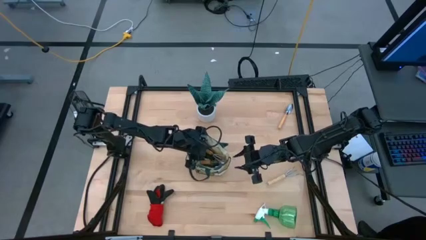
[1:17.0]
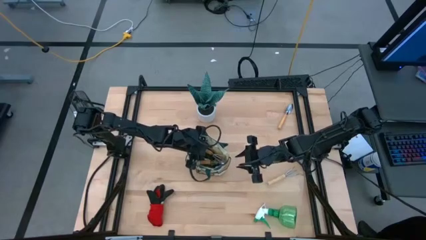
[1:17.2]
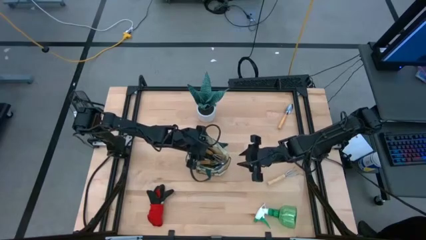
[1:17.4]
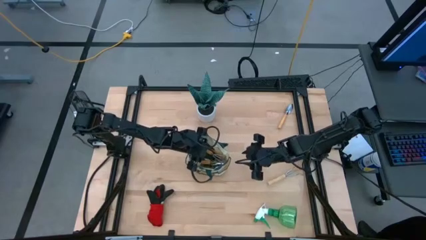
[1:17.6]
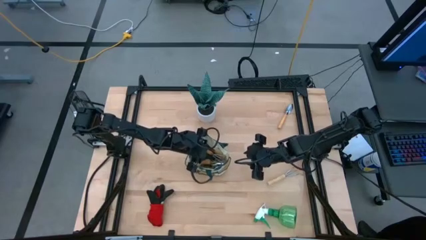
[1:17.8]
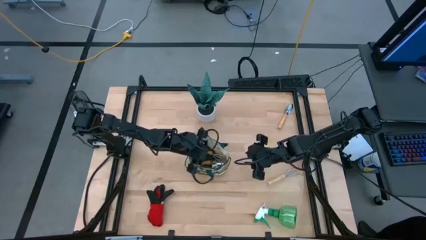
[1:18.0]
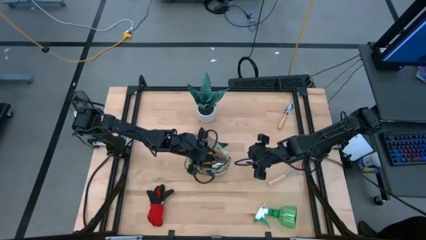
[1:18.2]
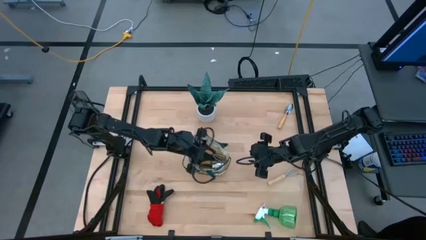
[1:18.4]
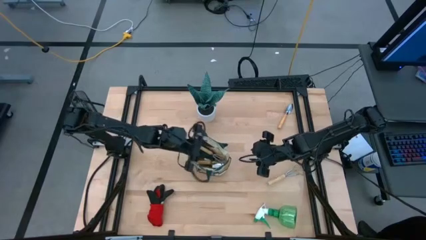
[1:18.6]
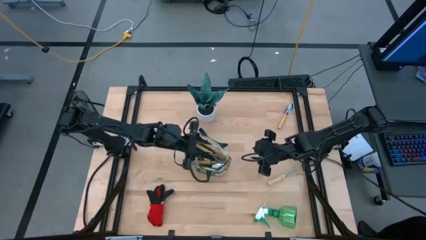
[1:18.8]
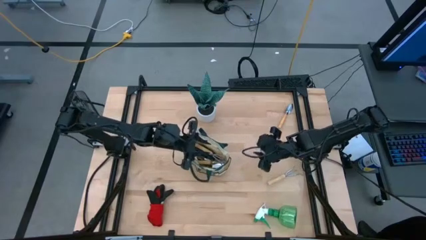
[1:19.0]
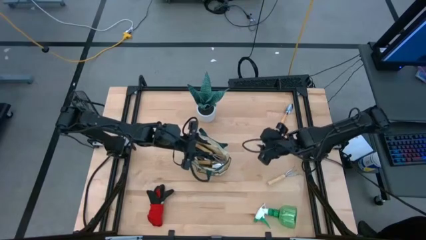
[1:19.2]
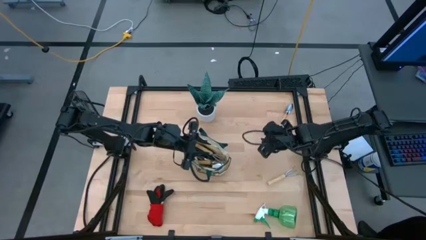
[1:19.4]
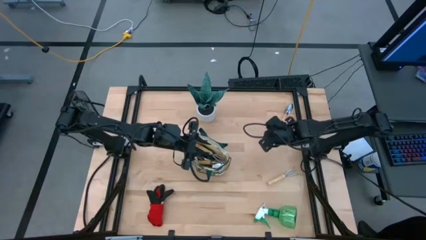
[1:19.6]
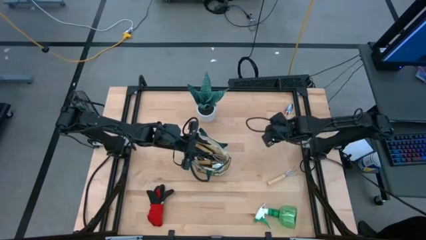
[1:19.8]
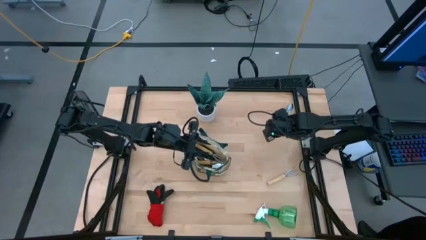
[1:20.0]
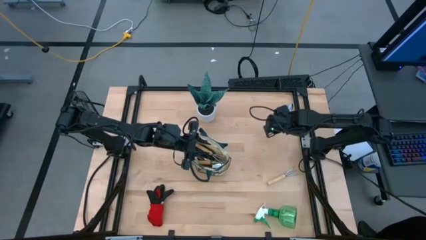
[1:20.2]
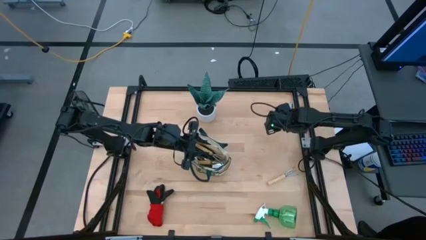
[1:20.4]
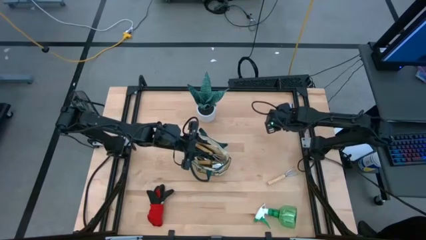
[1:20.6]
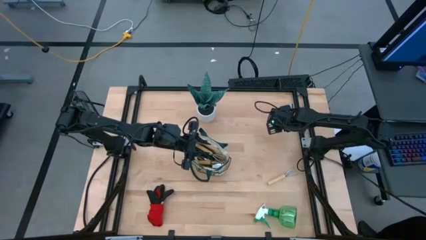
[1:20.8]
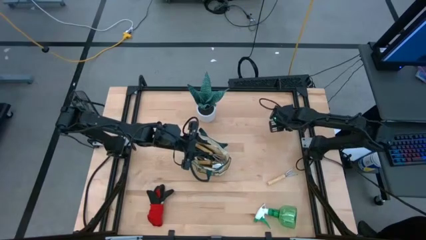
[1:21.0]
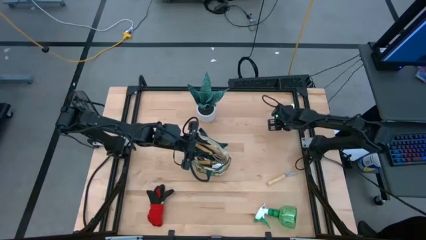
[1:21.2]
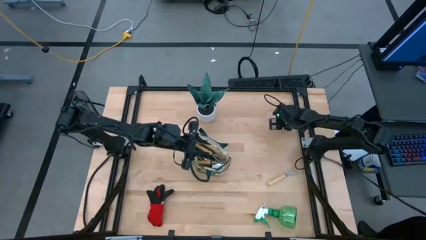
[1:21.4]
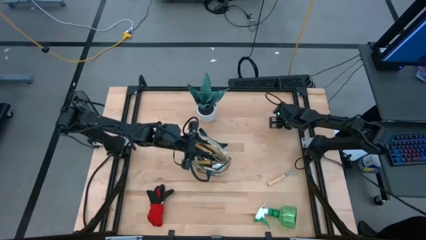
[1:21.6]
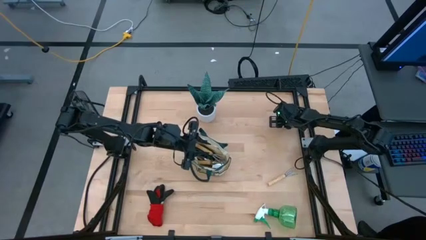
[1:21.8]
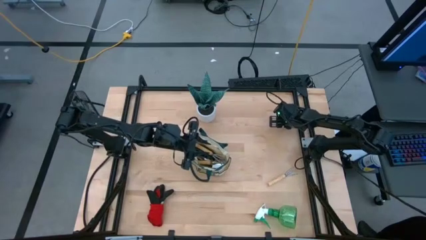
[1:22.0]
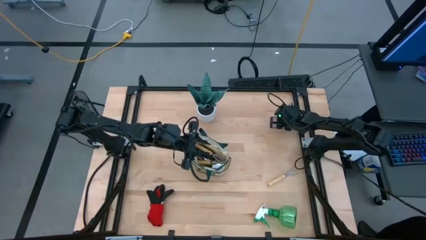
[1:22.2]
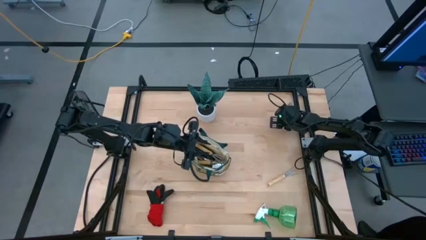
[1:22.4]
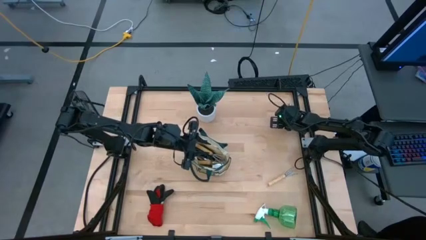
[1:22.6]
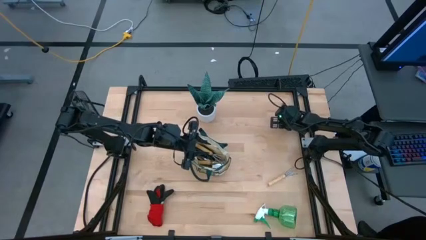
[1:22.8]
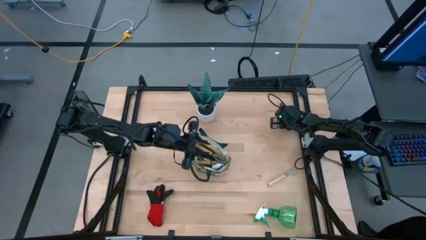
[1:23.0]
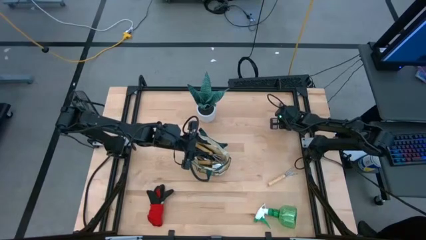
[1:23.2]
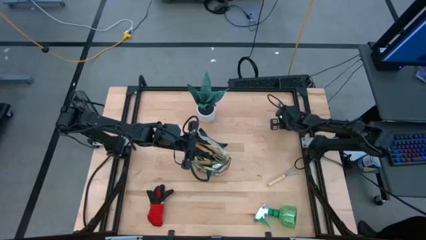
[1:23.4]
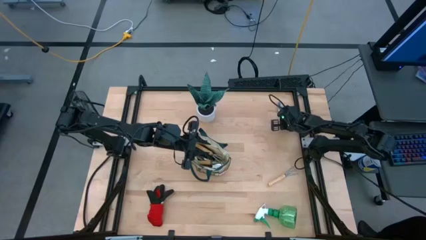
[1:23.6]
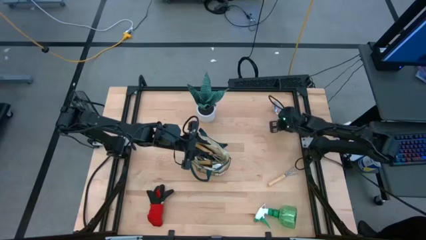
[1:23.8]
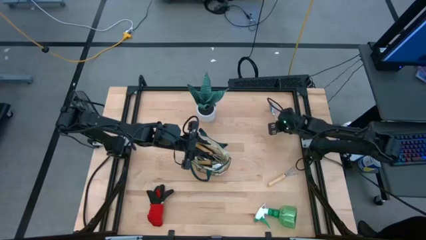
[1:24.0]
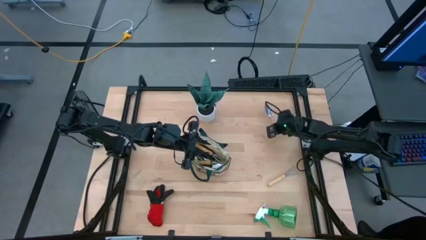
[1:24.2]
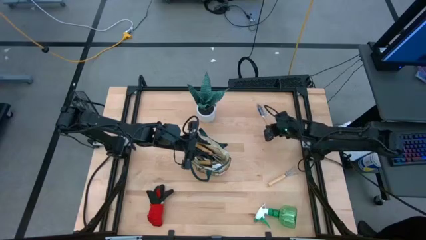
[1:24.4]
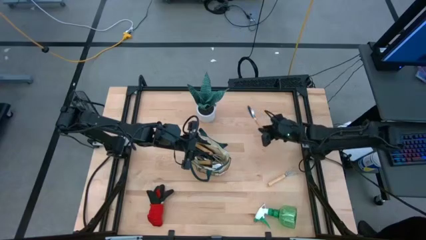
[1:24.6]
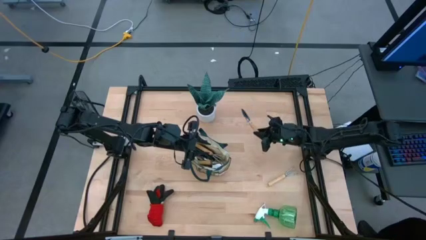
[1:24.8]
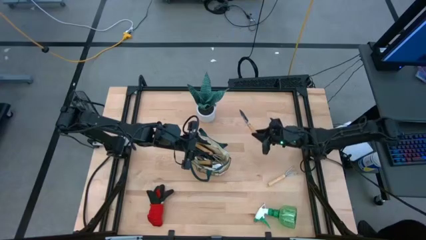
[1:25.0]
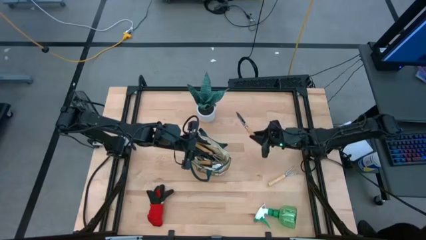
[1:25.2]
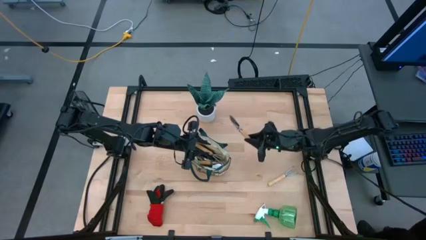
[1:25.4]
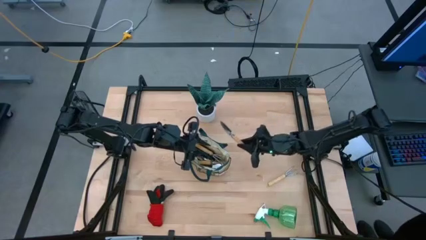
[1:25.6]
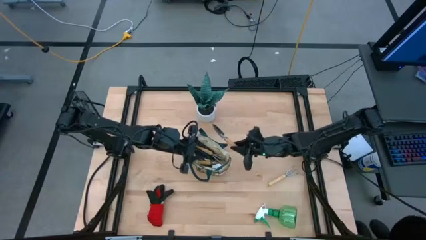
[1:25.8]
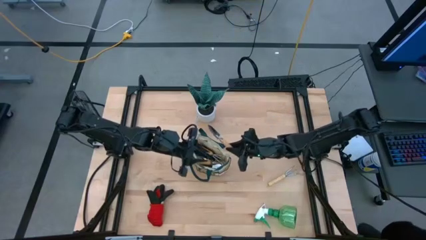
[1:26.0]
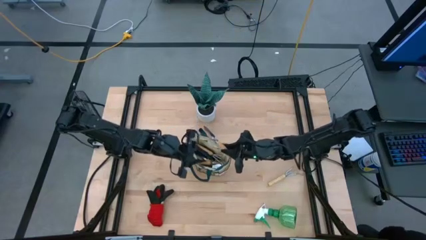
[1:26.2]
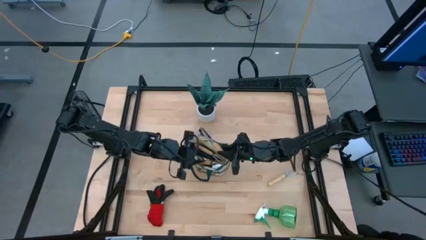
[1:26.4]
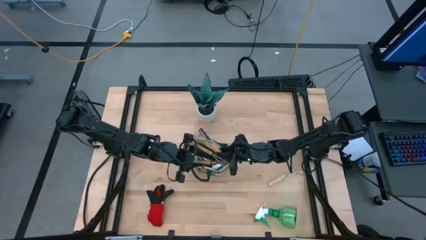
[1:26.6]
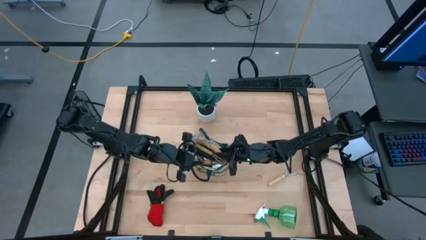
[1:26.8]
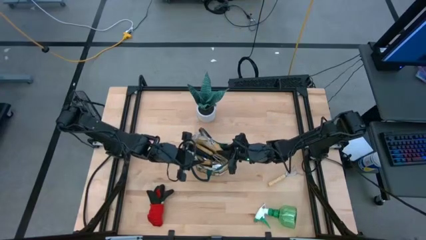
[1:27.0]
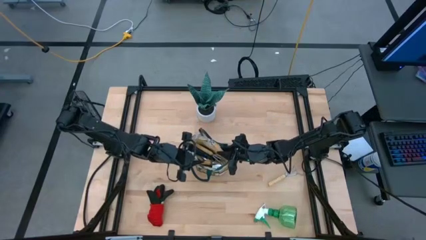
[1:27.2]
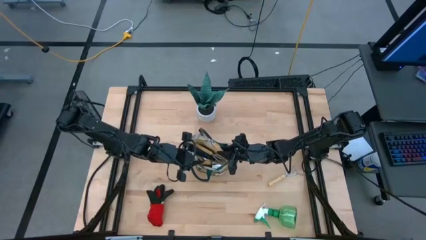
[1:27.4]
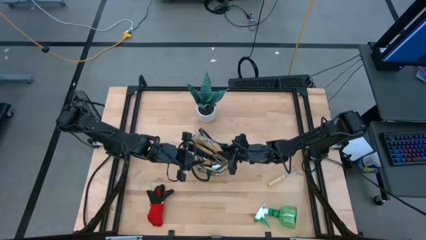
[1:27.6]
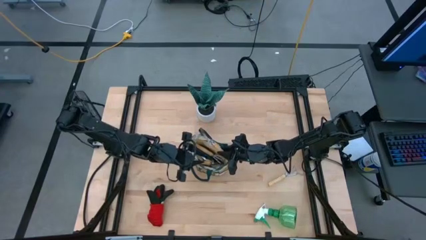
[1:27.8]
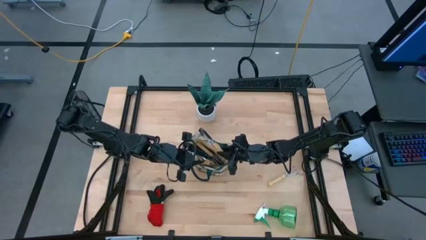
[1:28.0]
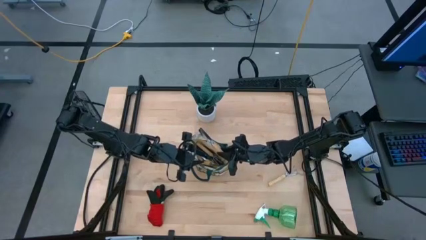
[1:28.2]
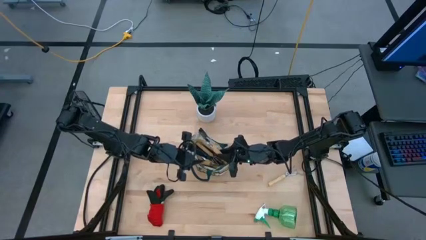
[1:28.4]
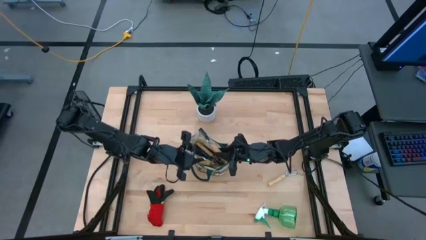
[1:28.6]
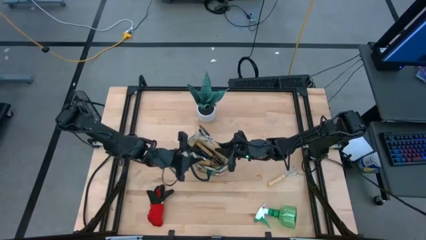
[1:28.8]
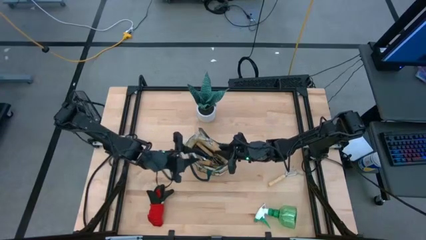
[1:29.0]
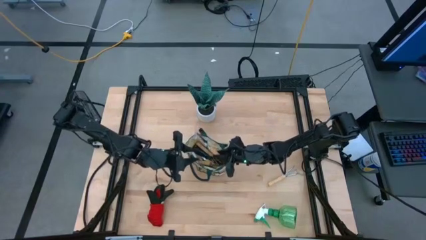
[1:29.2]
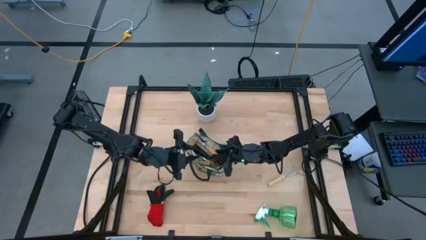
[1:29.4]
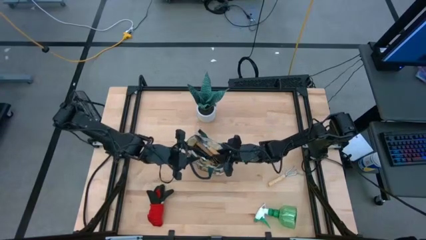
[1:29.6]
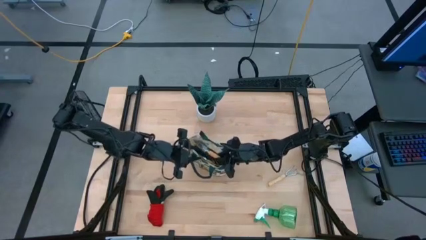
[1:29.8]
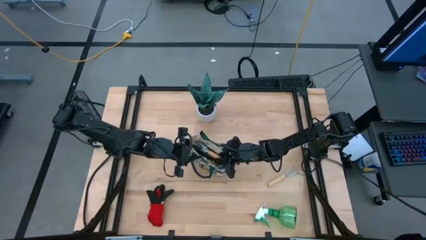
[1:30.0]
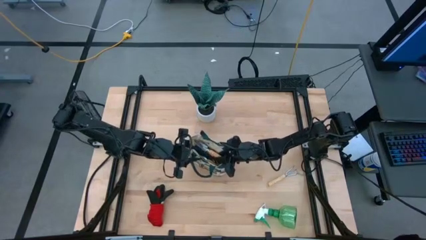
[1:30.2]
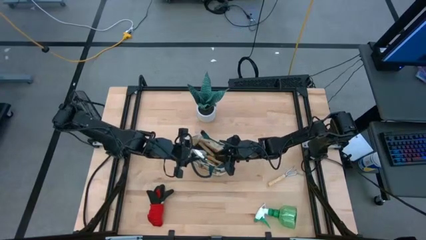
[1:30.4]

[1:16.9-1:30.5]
Task: Pick & Place Garden tools in Gardening bag
Put the trowel into the gardening bag
